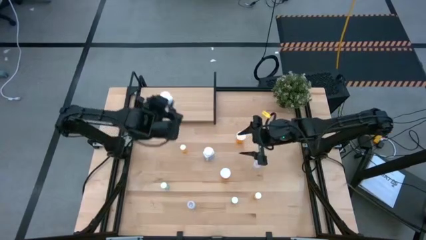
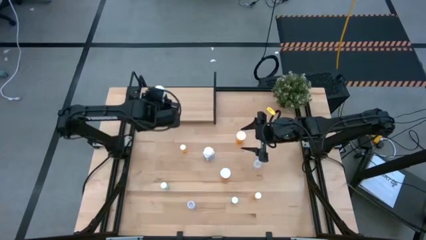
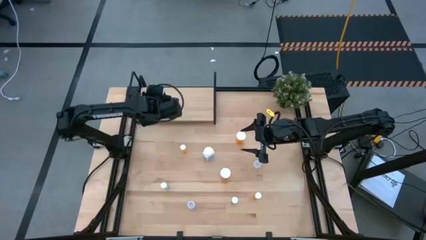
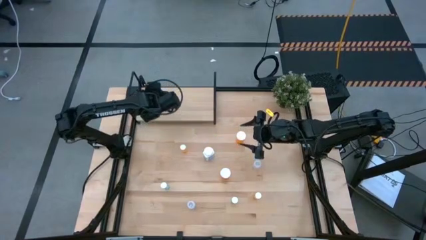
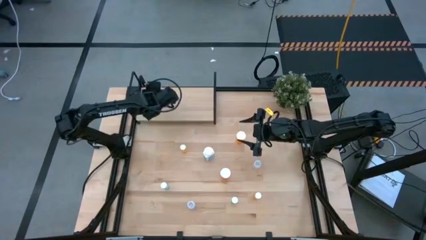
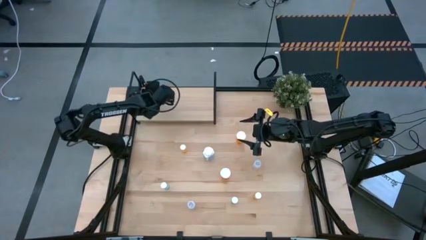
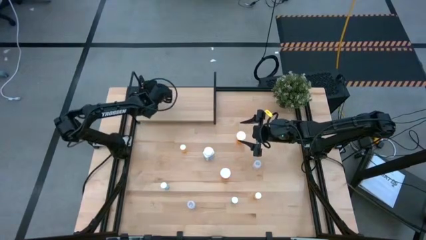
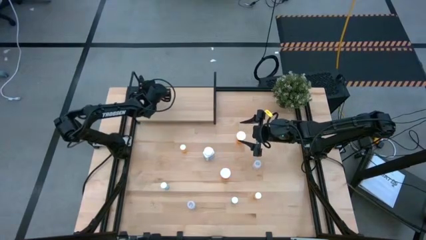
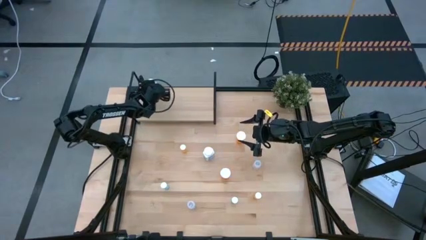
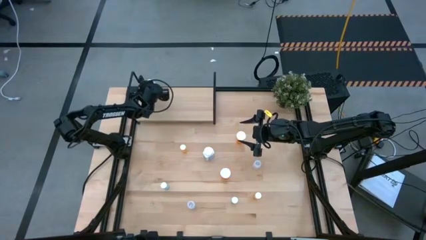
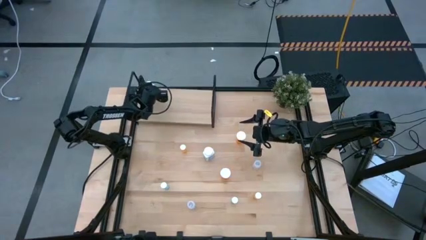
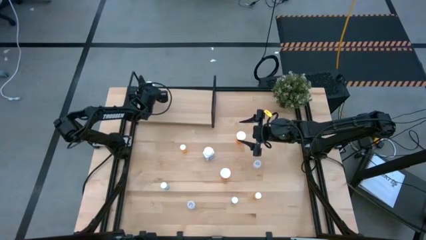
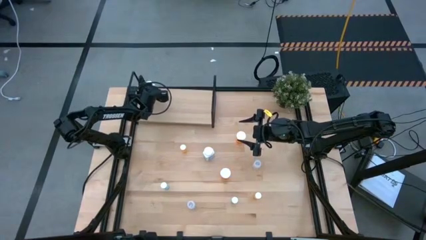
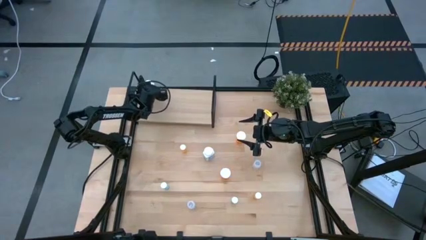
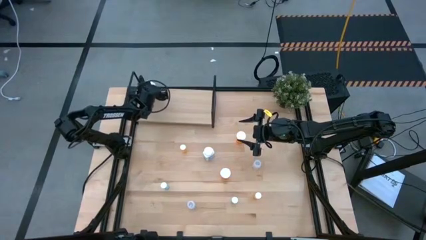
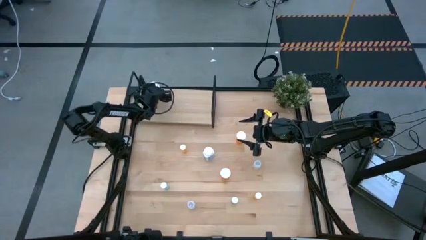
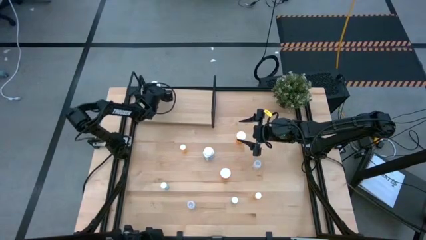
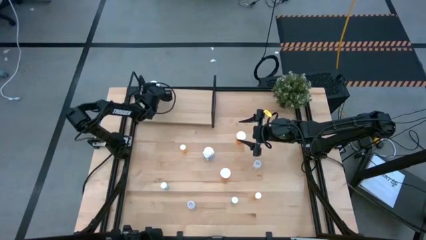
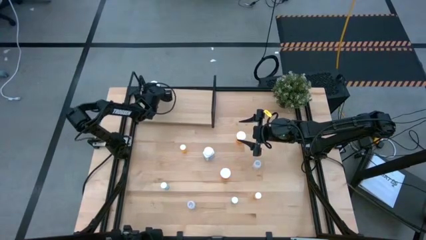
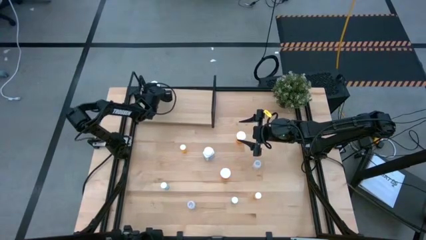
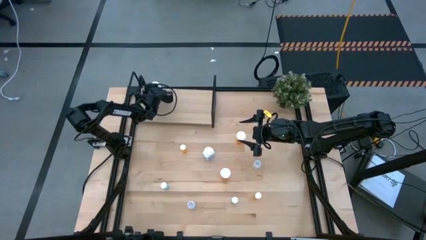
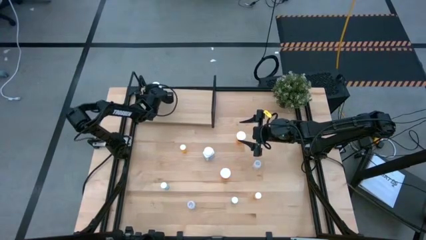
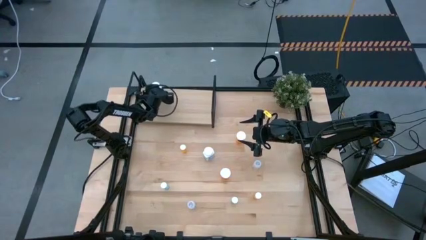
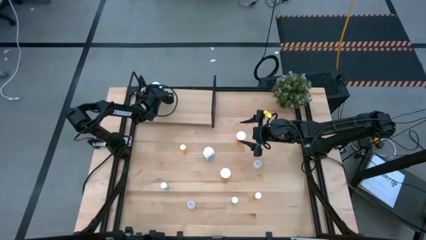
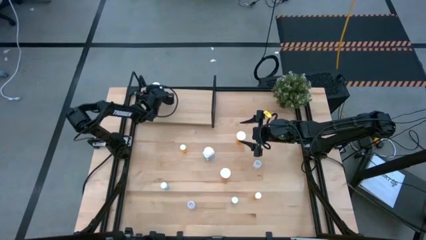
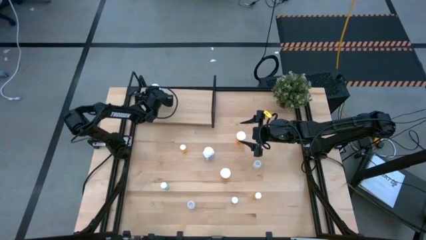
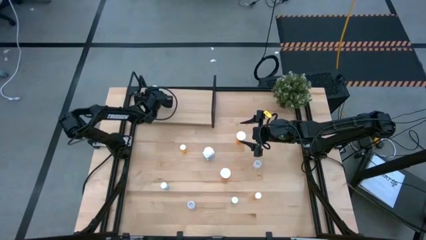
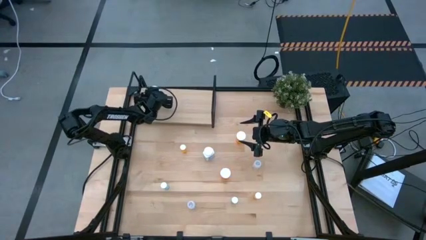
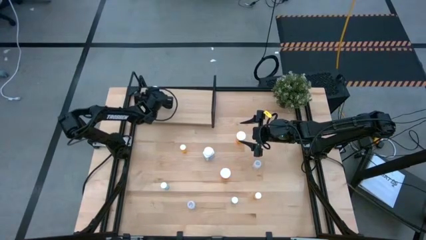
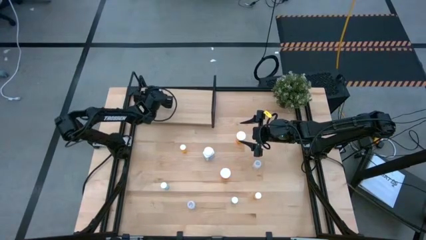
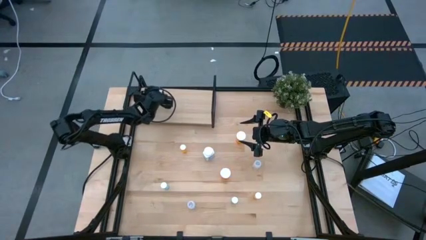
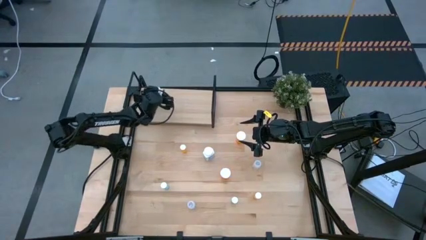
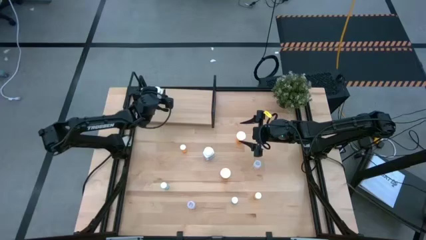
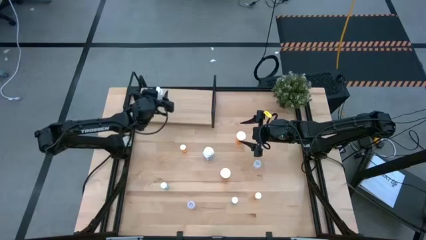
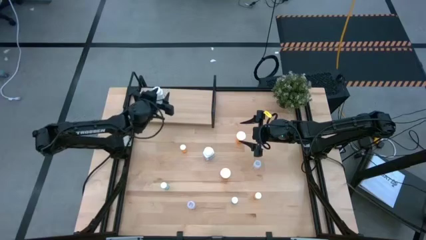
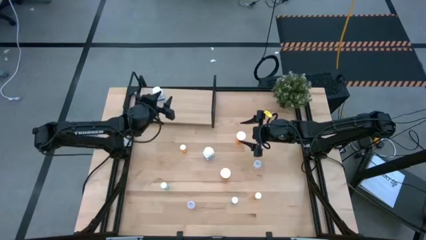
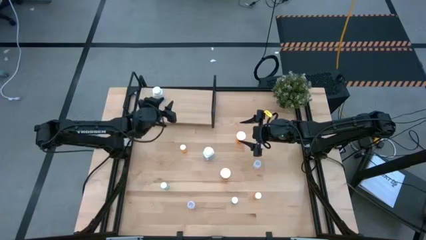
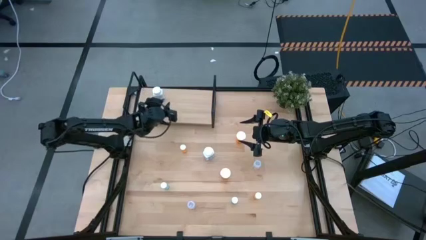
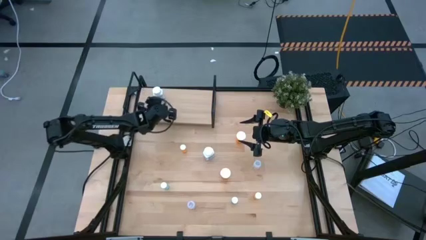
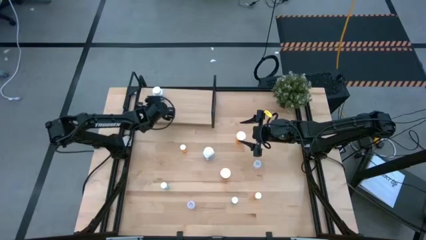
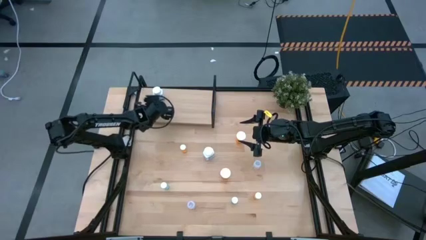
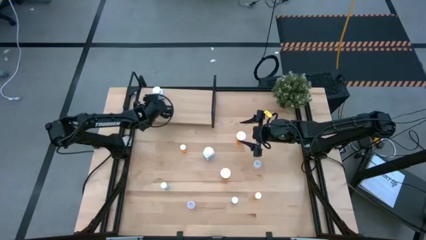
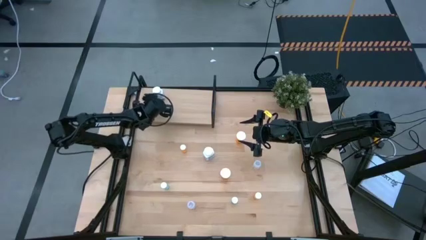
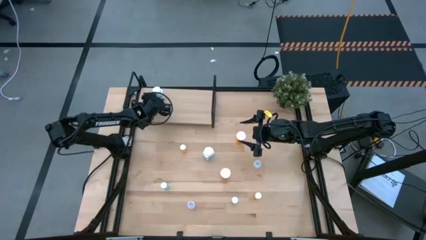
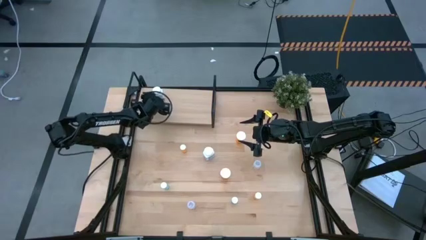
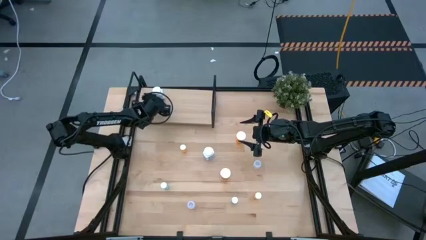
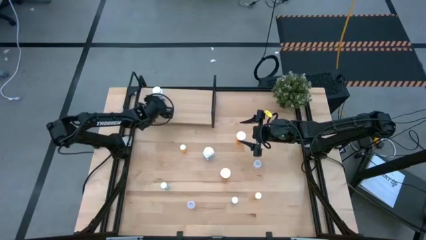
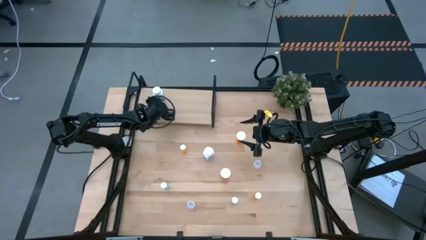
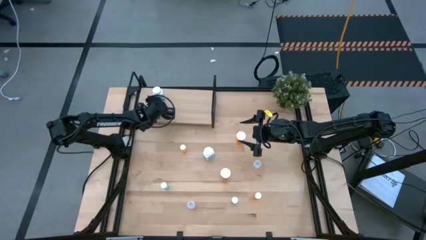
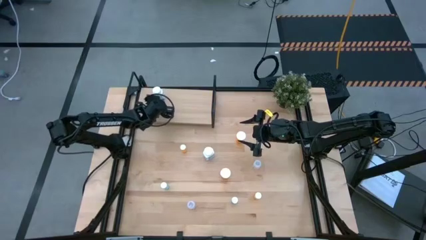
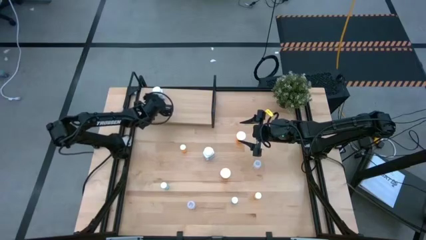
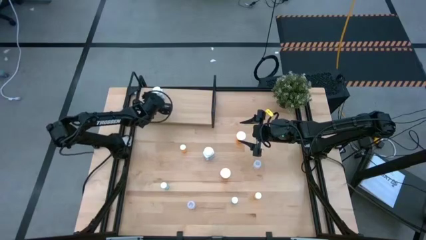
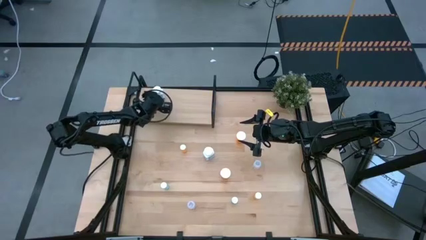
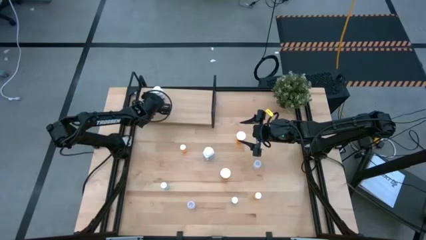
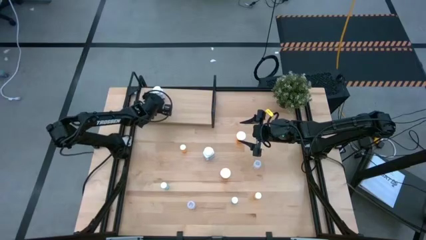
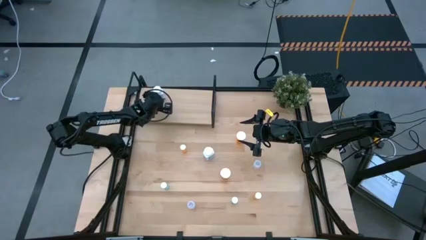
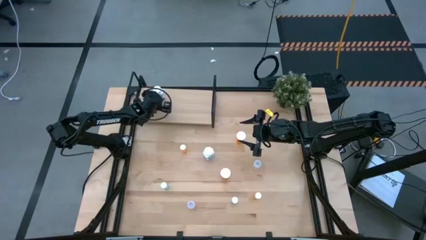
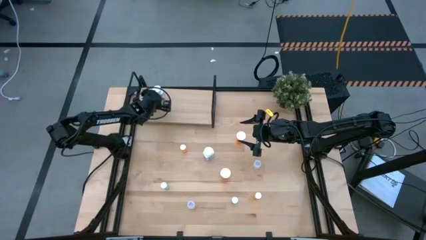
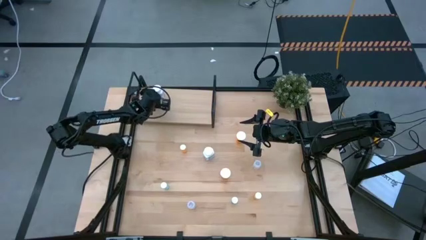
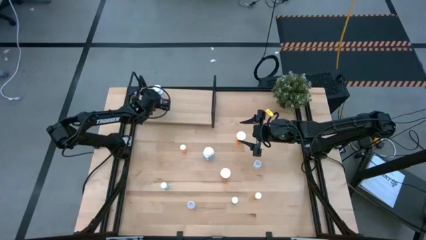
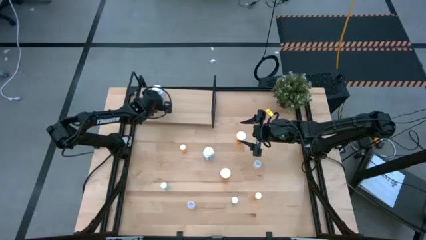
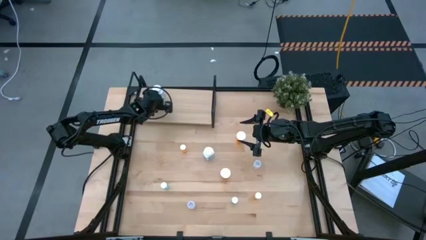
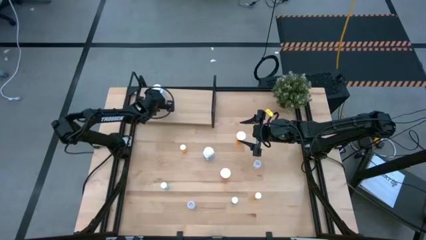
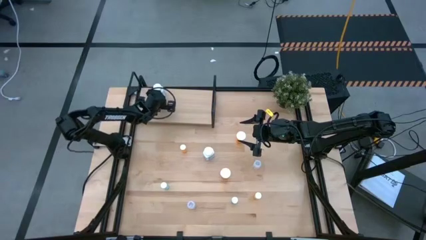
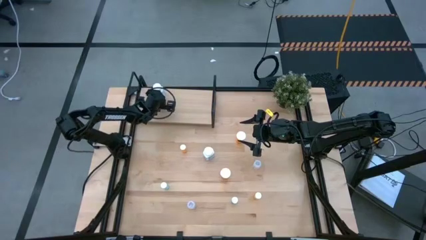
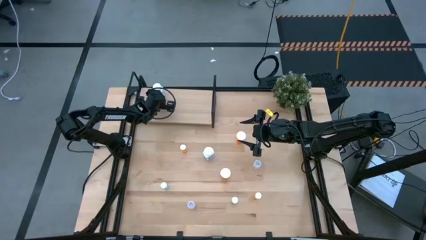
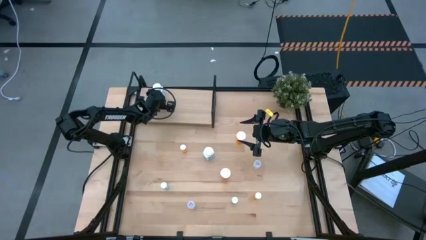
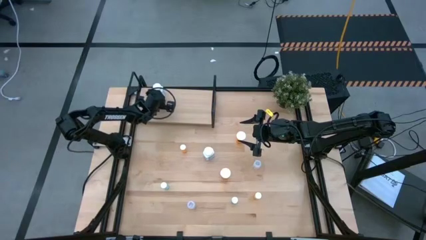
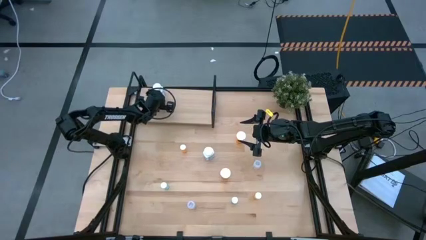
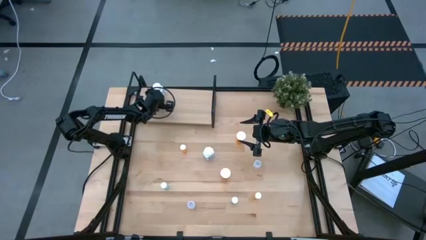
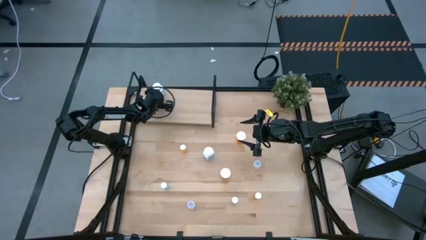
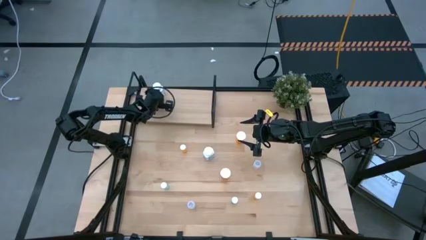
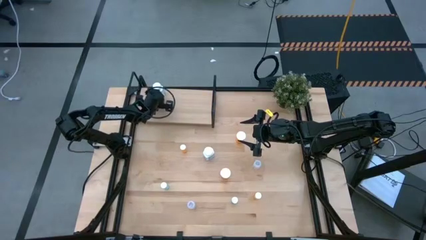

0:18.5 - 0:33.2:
Task: Pick and place medicine bottles onto shelf by color
Put the bottom white pill bottle on the shelf
